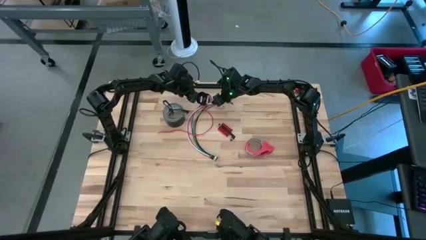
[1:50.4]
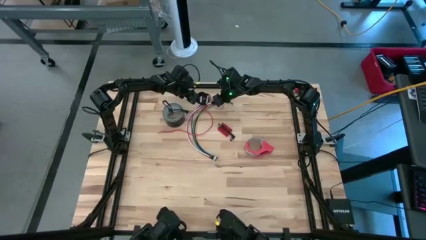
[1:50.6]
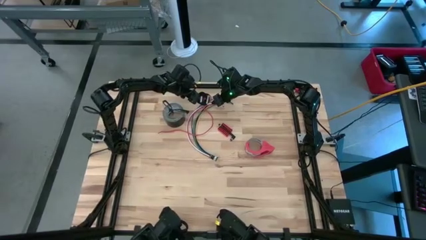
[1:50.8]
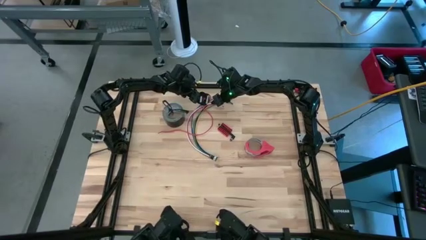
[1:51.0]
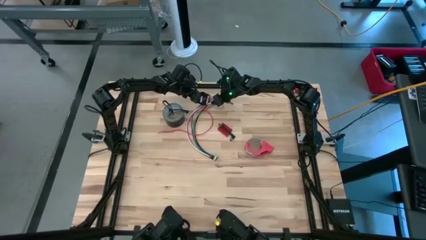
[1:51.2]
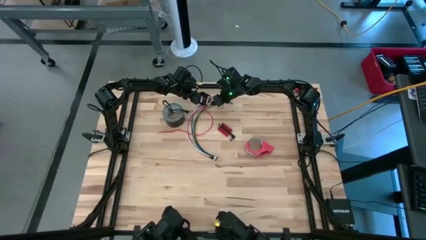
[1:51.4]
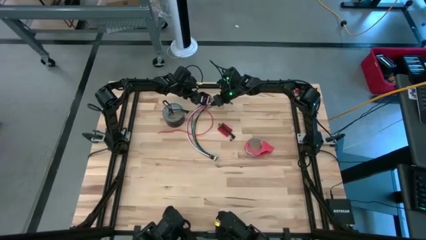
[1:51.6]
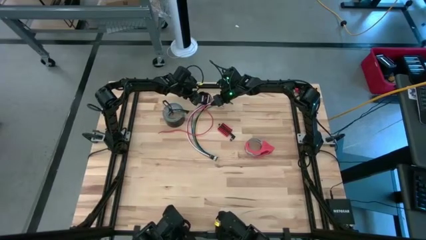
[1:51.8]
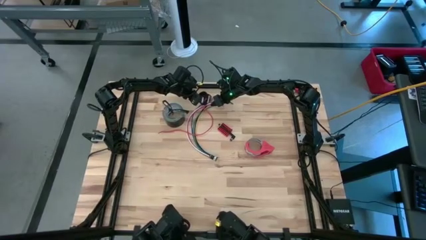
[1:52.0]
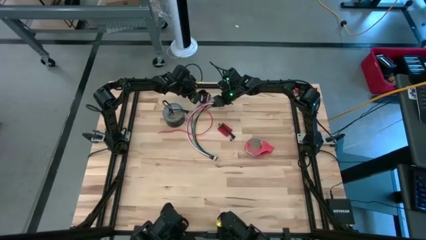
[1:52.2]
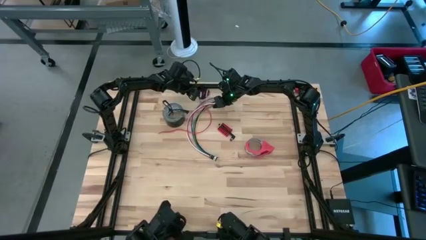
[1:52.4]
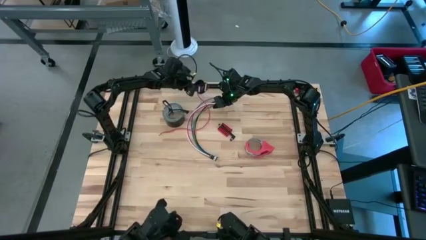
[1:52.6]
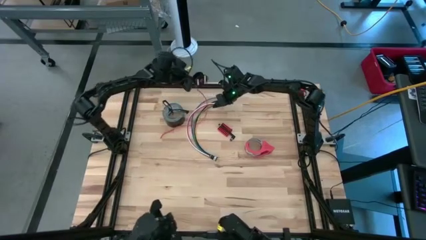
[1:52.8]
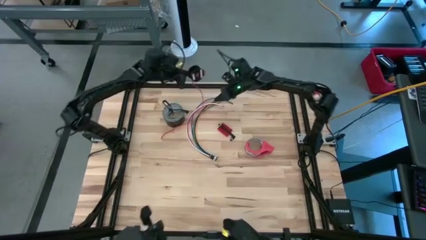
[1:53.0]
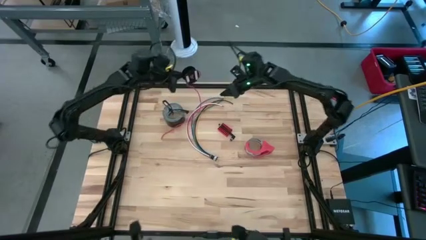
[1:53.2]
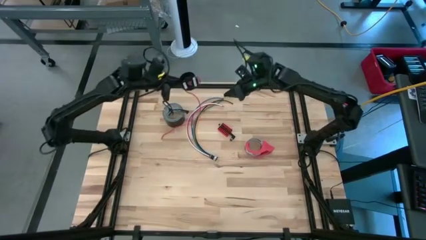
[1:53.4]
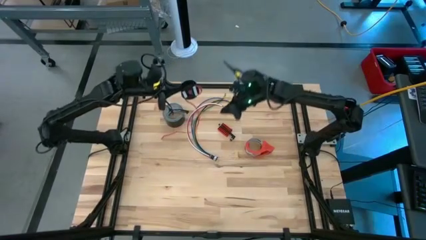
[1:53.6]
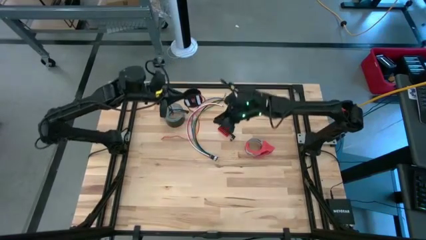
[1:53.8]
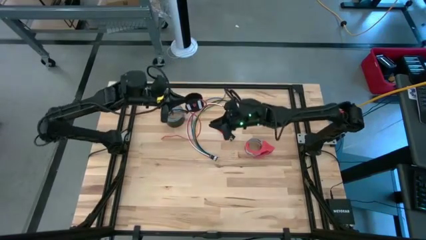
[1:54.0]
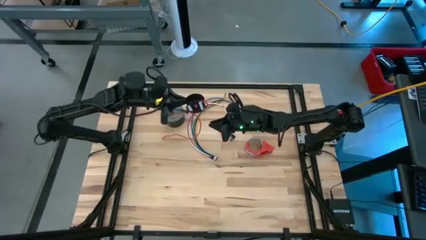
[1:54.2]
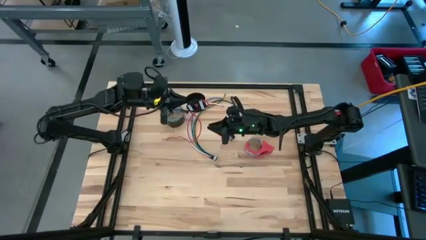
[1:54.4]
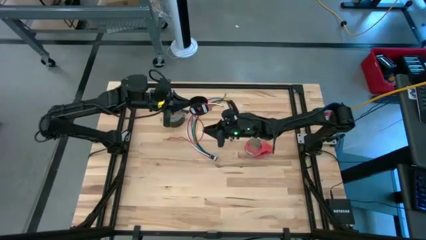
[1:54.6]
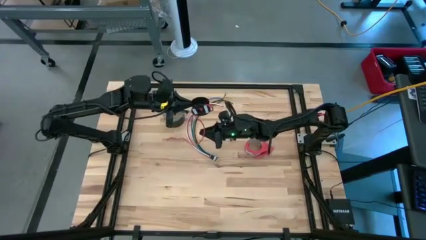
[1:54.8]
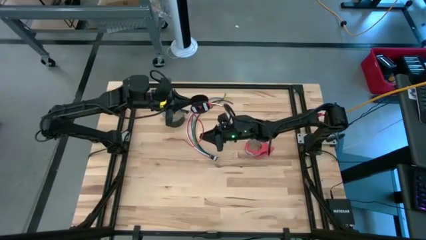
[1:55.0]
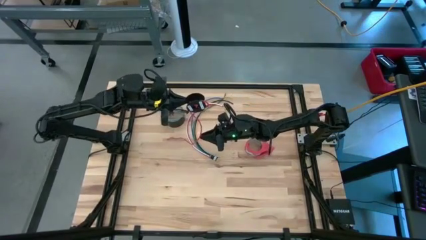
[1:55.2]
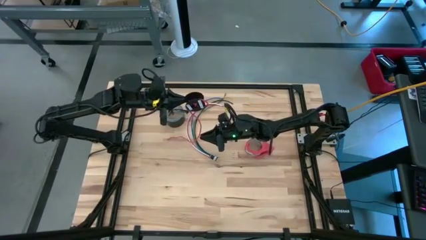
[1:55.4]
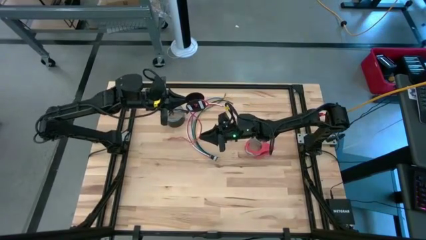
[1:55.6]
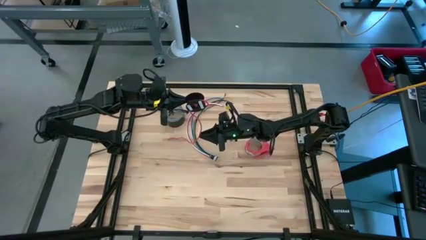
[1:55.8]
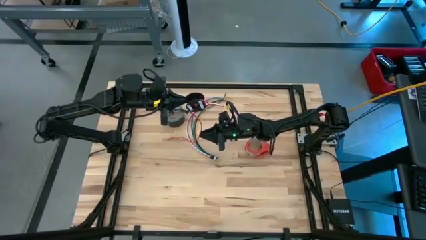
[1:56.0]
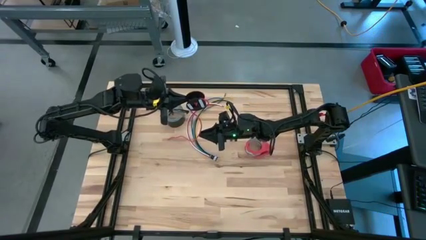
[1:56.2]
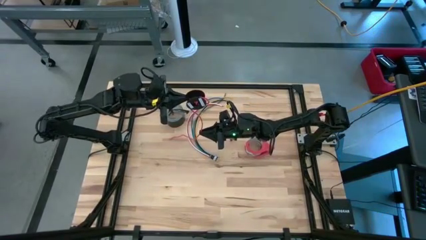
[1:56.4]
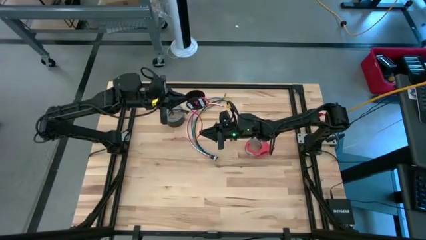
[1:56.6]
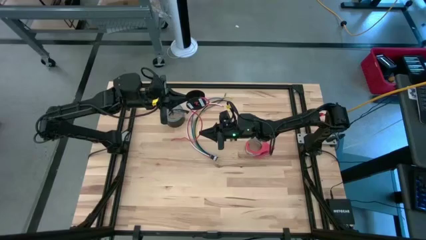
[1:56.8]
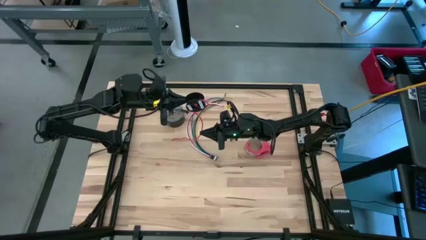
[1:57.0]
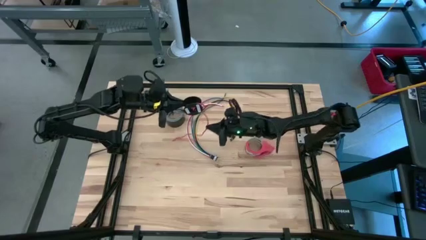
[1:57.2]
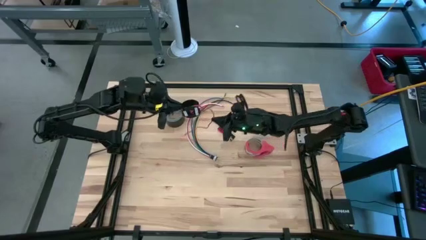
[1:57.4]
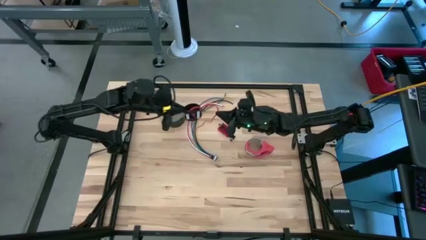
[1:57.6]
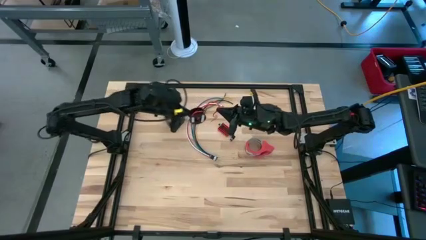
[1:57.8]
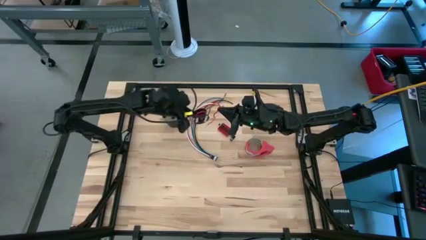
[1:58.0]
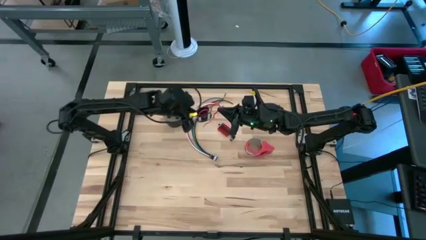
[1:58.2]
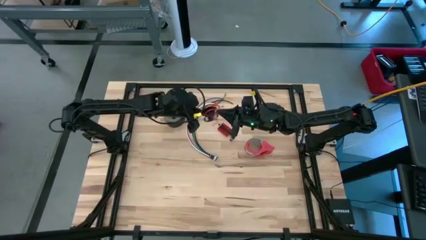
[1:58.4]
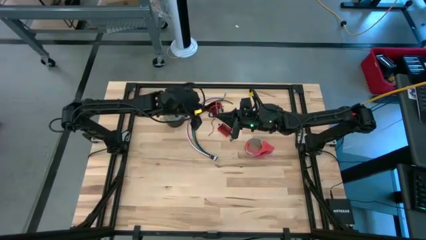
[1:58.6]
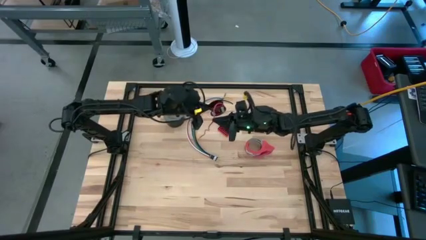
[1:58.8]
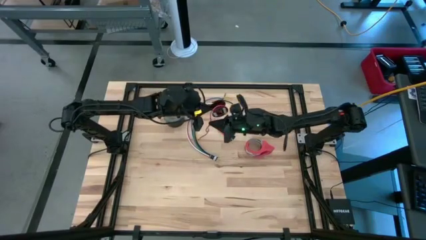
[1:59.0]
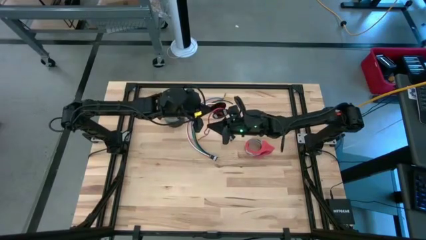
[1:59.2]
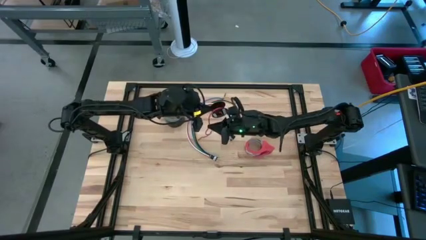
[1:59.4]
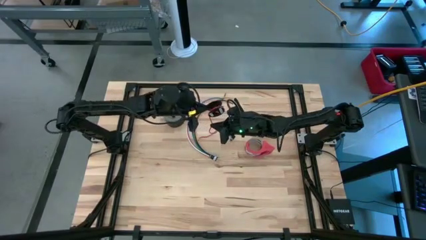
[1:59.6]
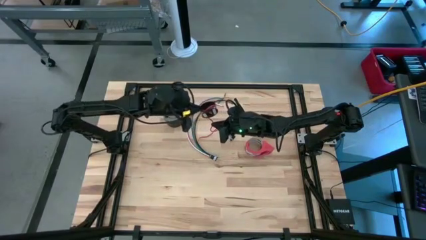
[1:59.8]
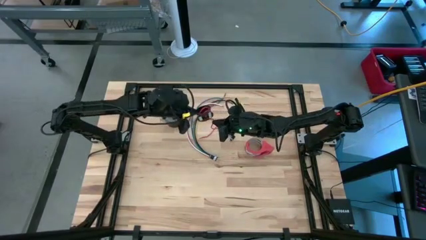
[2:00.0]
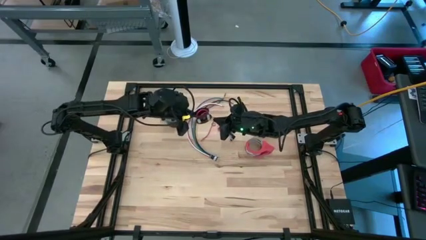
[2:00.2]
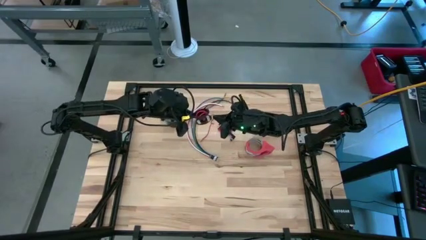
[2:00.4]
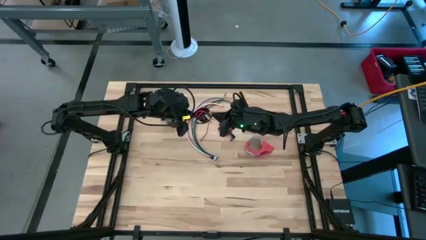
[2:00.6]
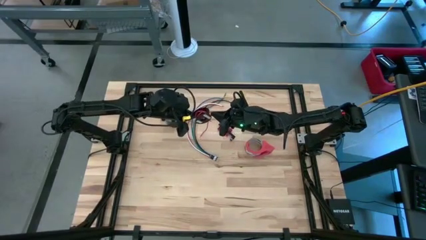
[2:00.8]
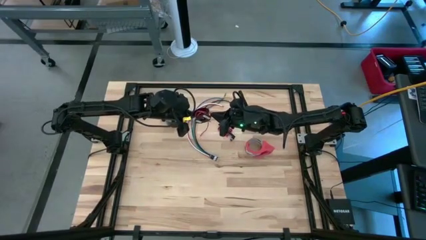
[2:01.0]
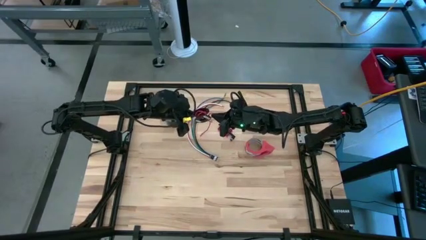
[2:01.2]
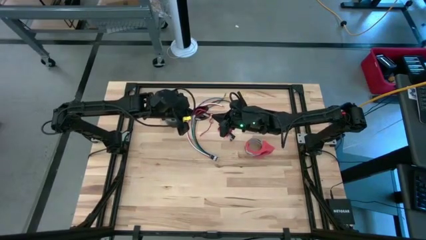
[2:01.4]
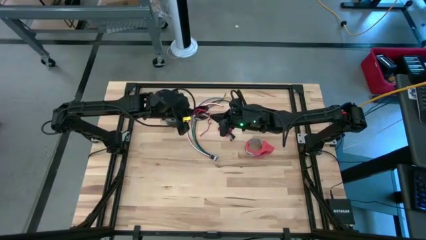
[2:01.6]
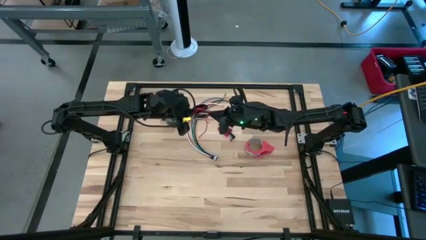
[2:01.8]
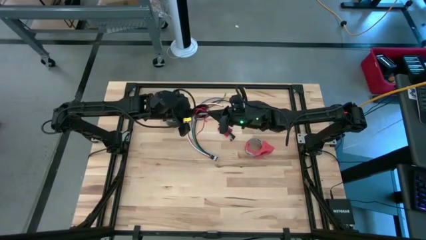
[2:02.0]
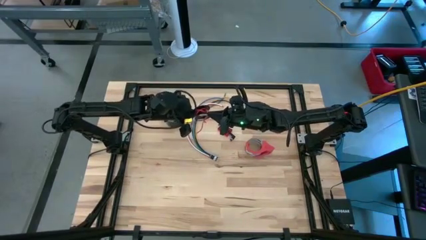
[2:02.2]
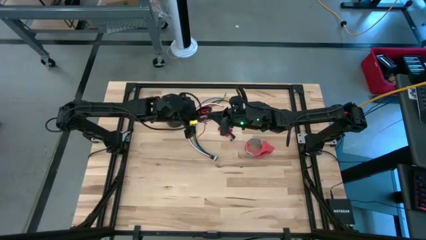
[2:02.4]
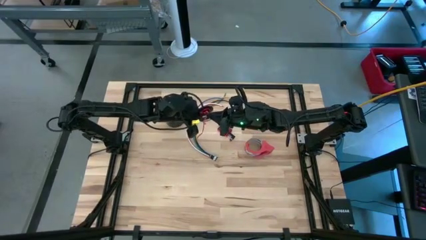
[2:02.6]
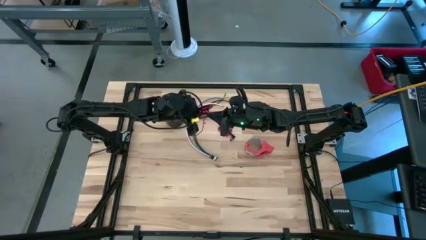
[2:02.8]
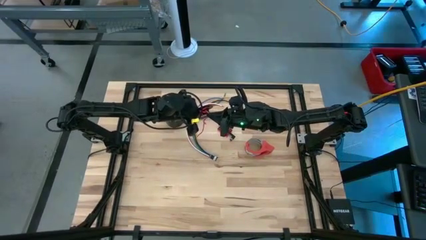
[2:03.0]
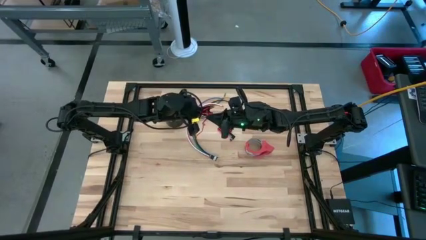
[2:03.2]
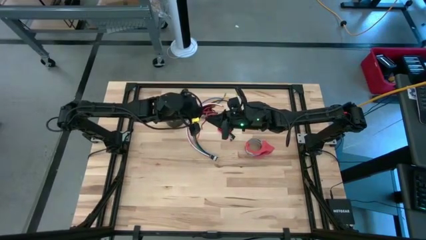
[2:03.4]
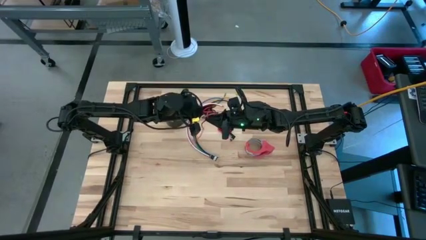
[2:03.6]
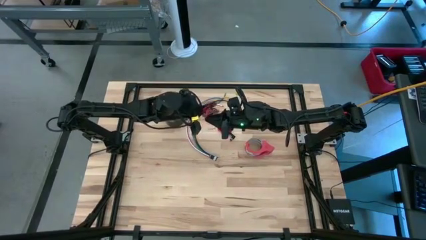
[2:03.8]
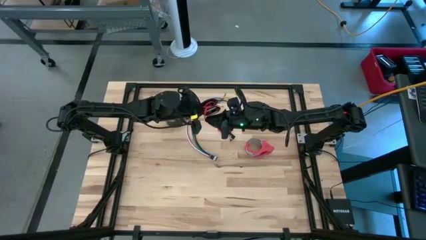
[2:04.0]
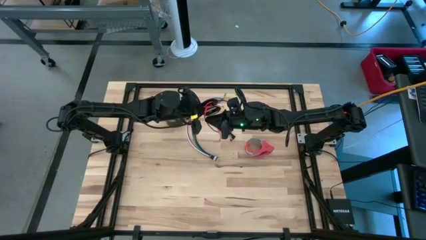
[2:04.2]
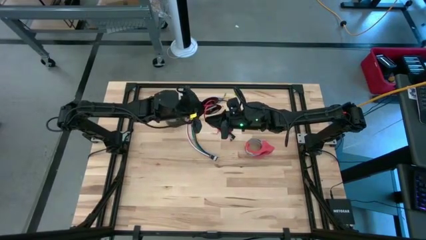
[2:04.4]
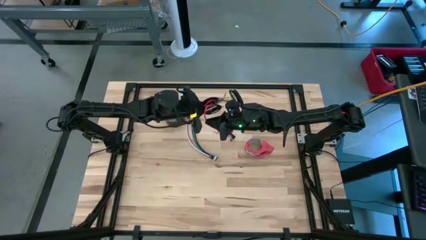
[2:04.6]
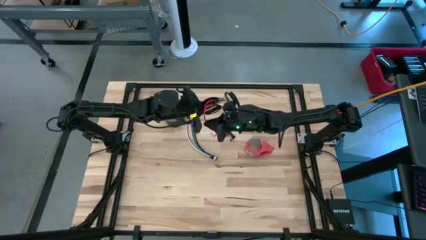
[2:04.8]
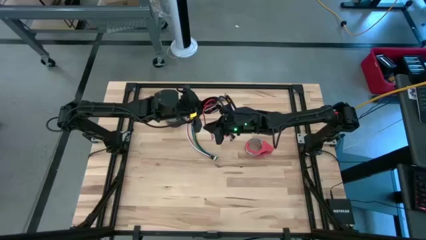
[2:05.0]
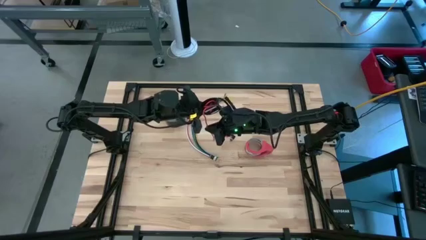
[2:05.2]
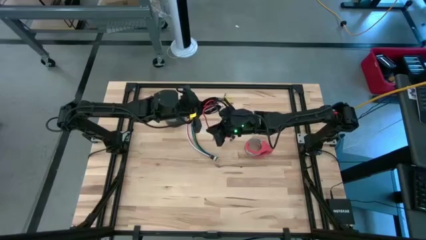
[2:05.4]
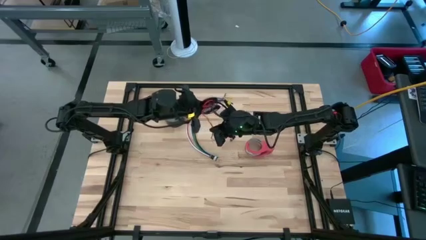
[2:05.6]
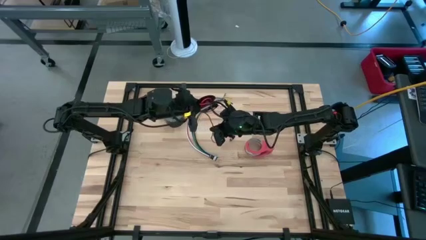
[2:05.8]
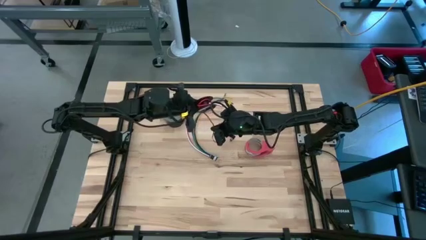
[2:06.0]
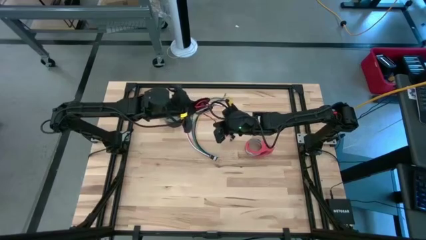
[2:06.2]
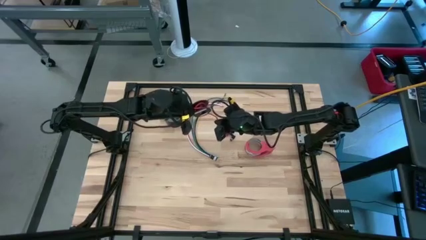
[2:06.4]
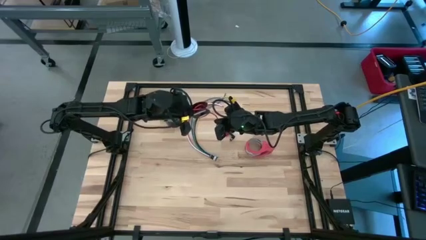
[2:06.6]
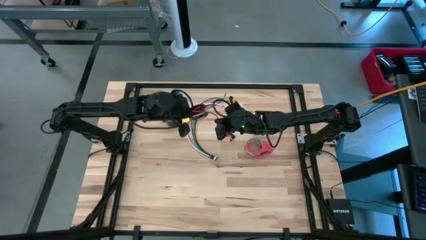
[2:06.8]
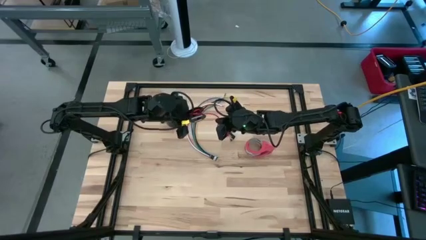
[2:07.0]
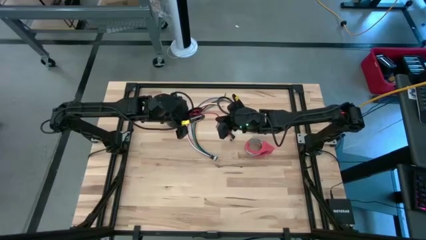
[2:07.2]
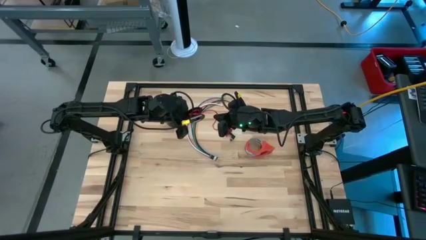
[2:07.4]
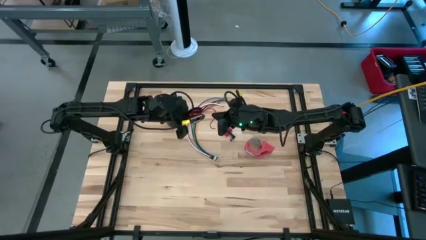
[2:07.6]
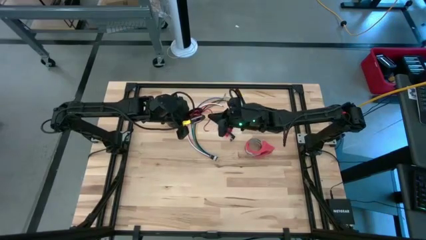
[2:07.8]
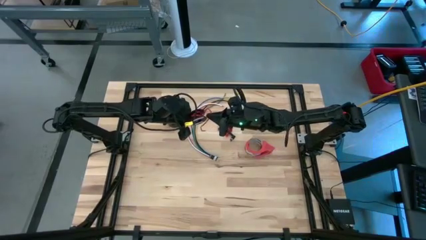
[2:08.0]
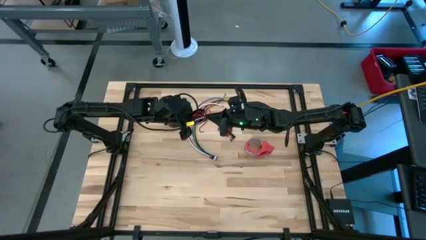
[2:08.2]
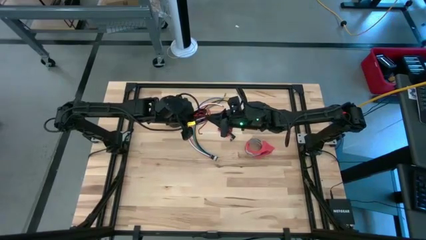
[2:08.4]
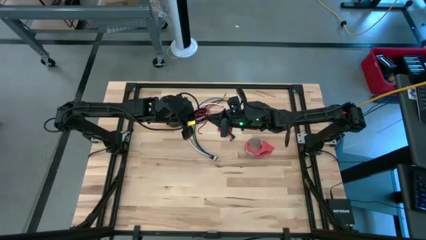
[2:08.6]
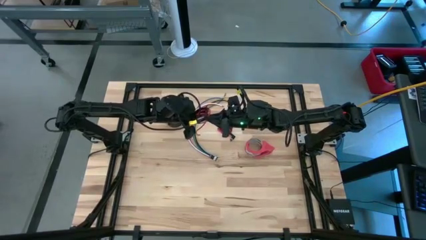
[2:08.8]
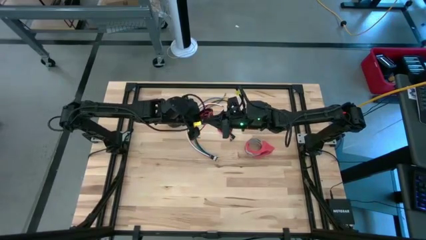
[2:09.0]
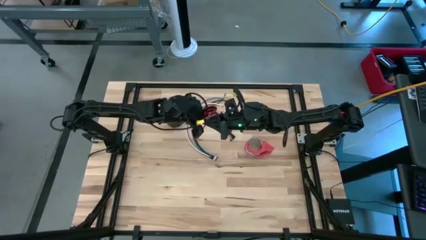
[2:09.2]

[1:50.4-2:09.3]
Task: Coil cords
Coil the red wire onto the spool
